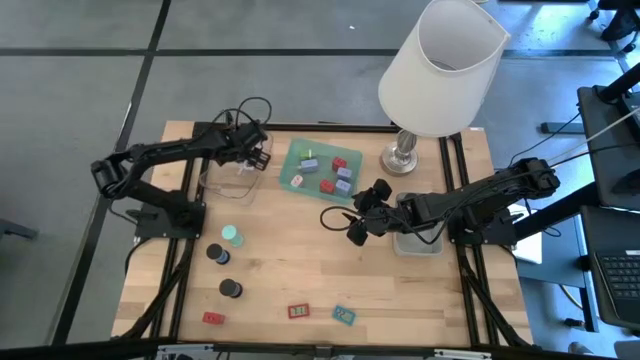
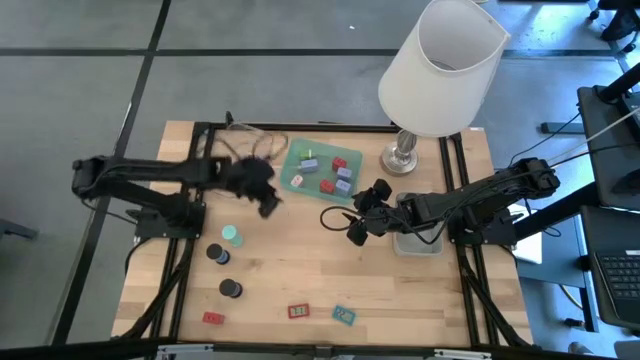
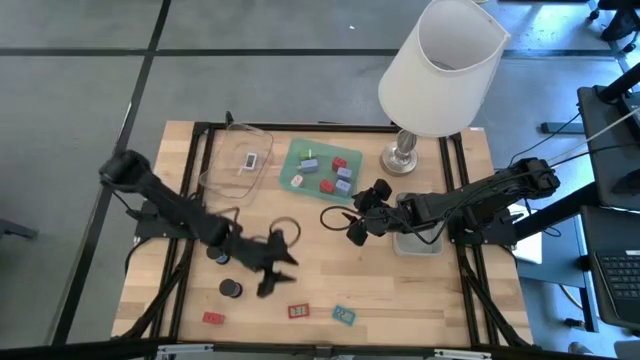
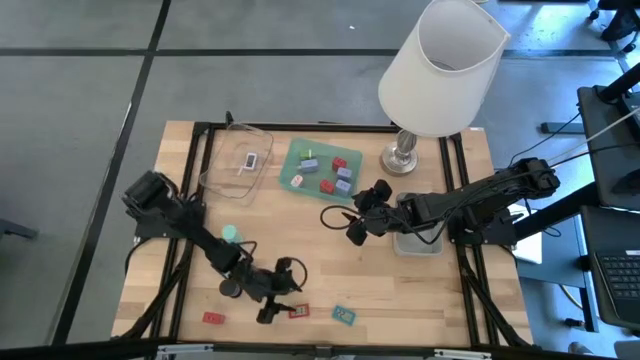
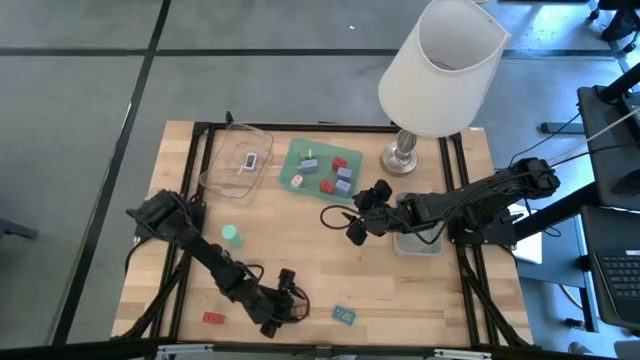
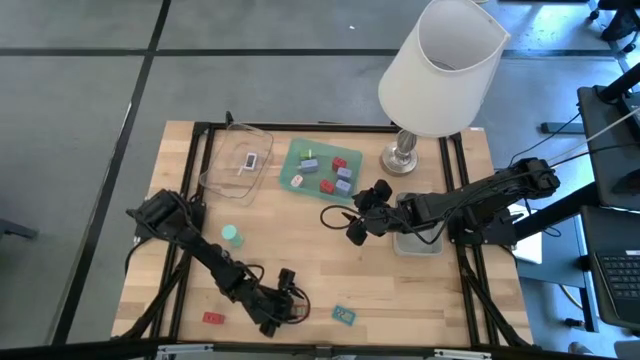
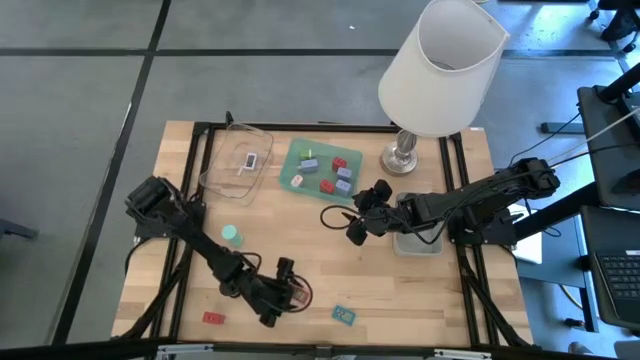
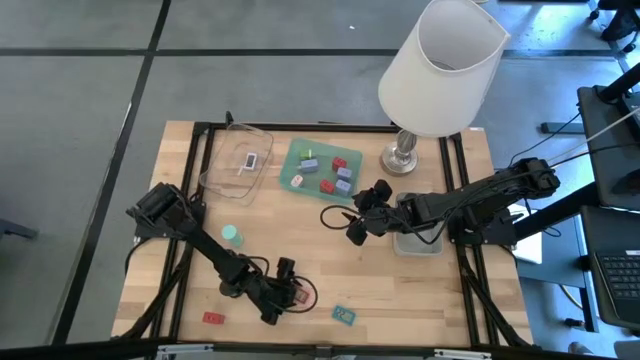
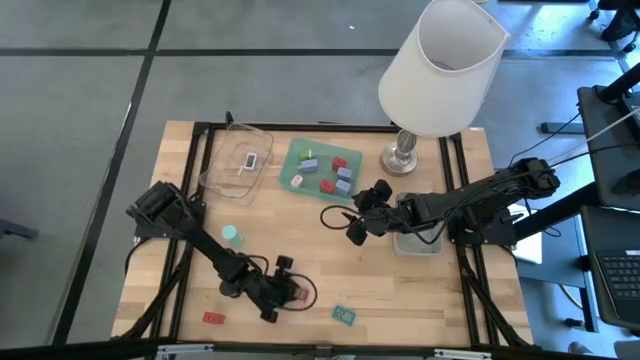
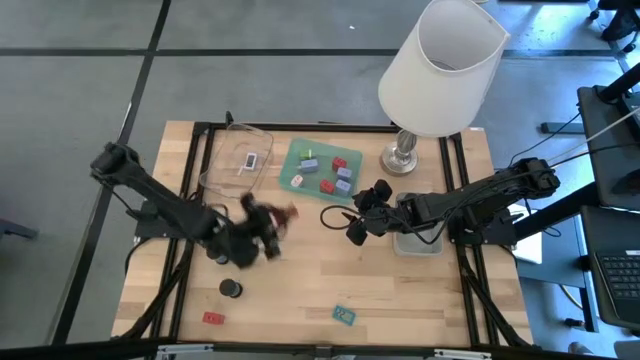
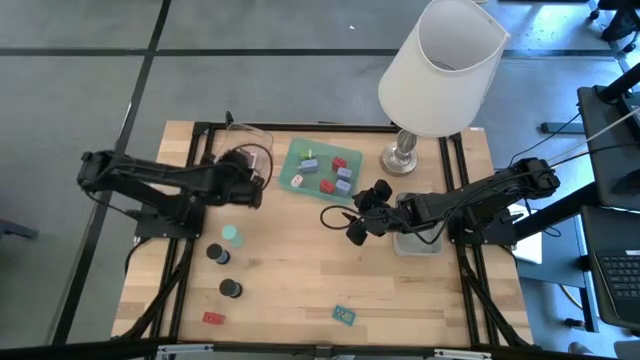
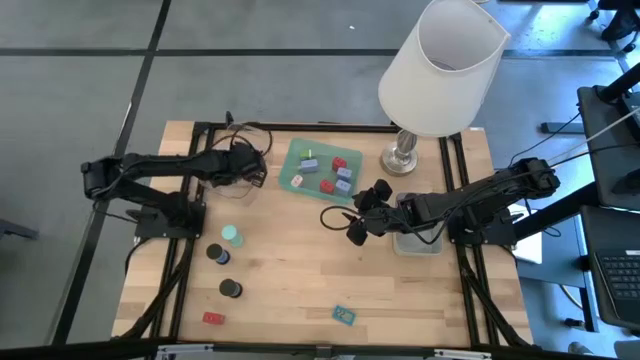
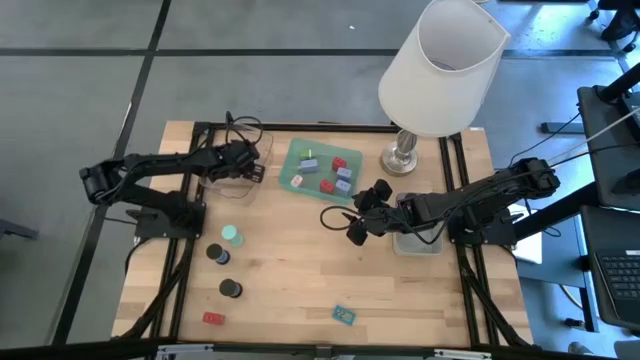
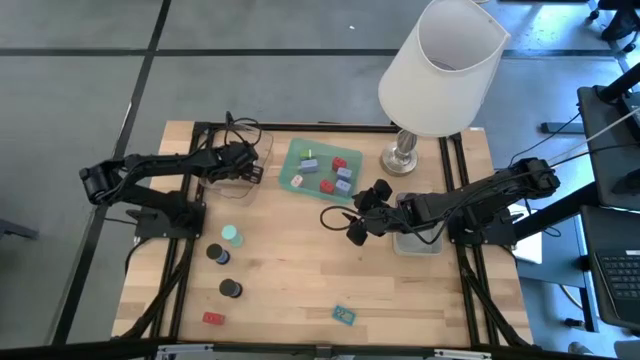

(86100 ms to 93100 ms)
Task: Pick & Place Office items
Put the red timer into the transparent bin

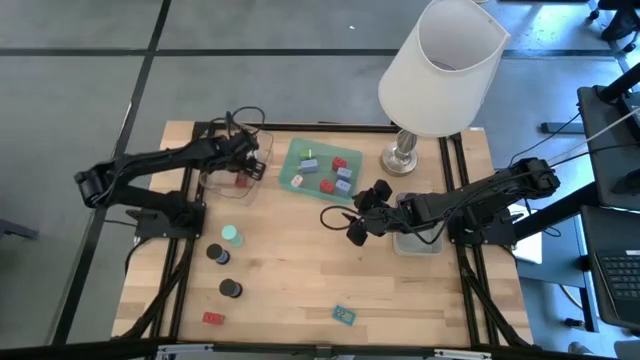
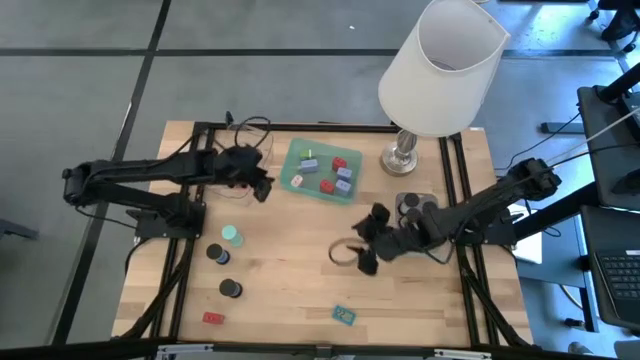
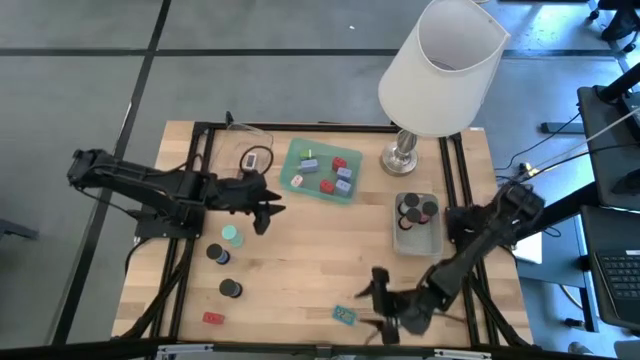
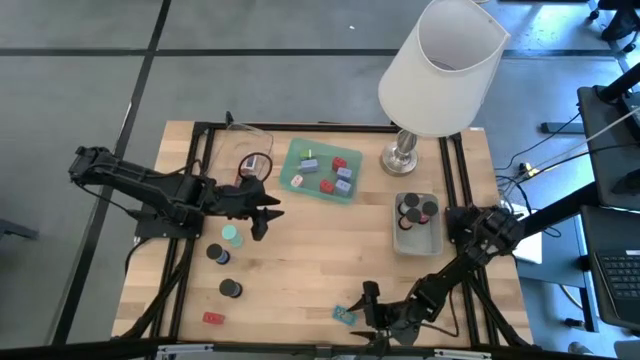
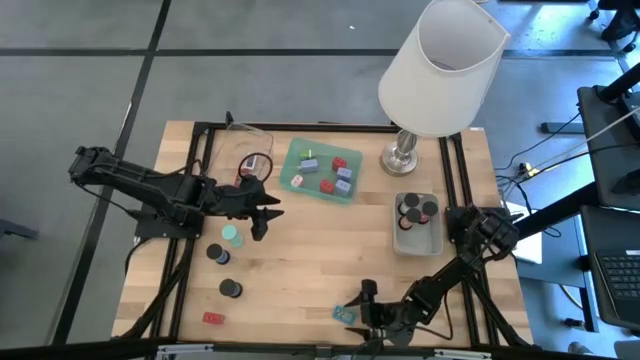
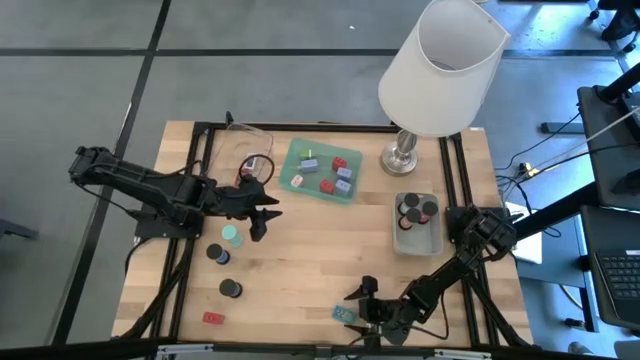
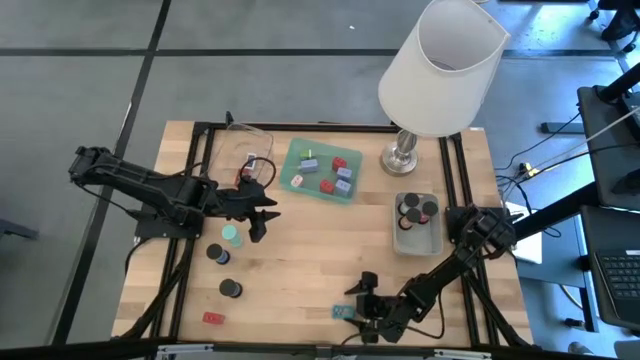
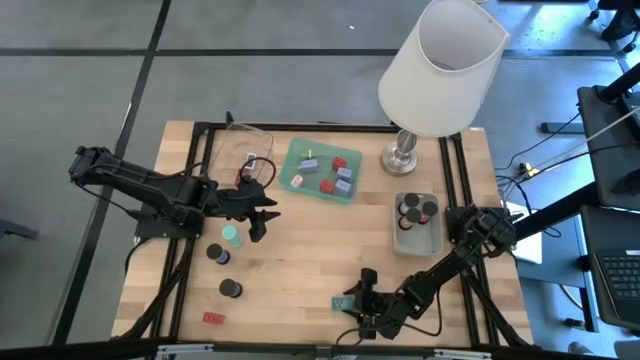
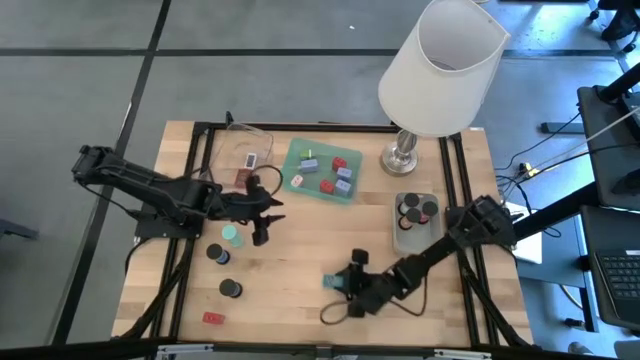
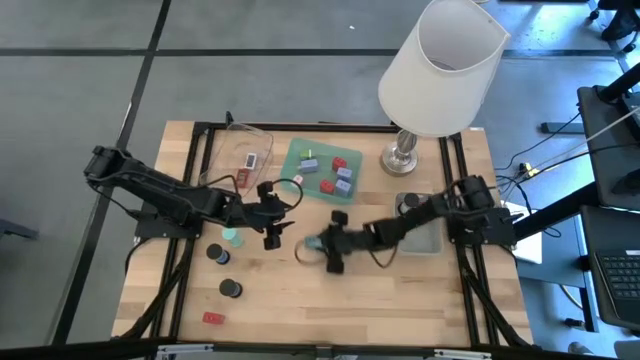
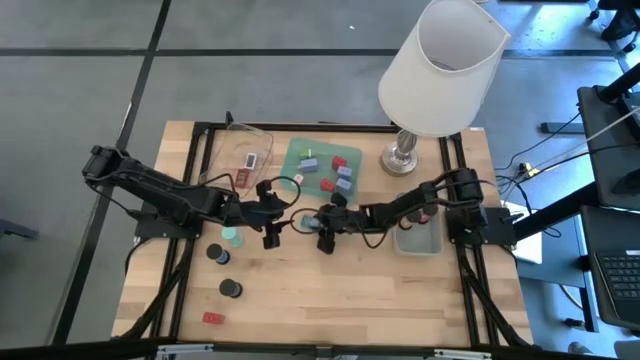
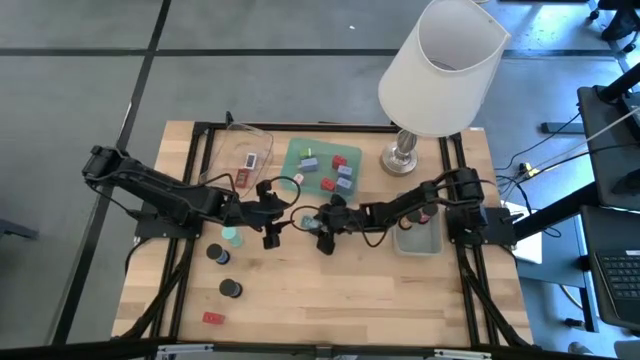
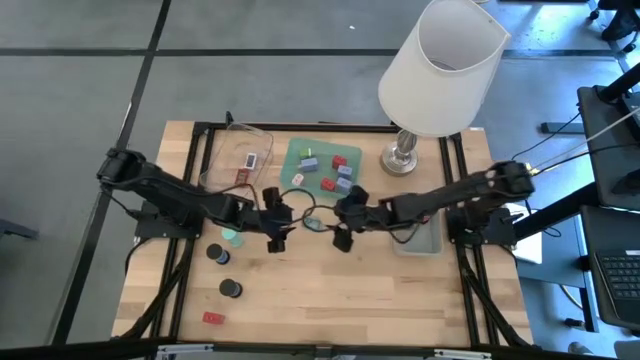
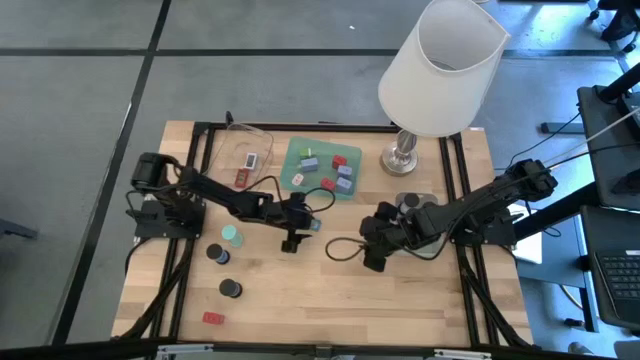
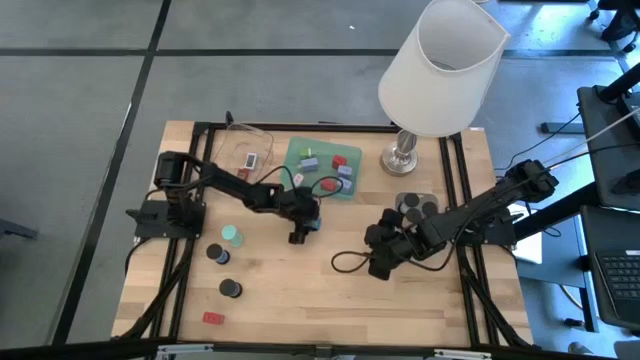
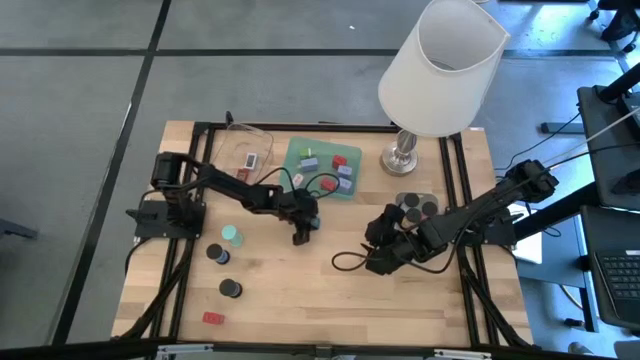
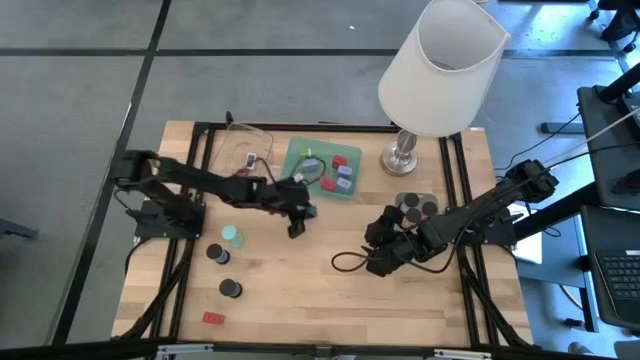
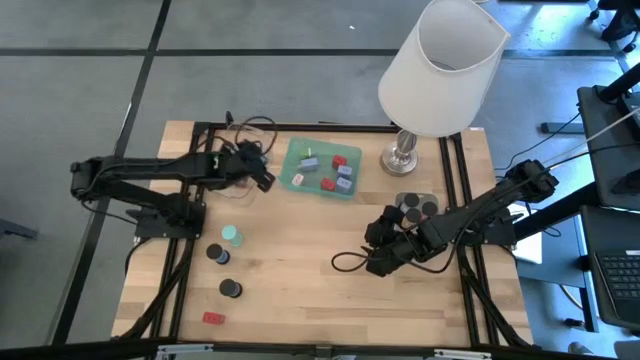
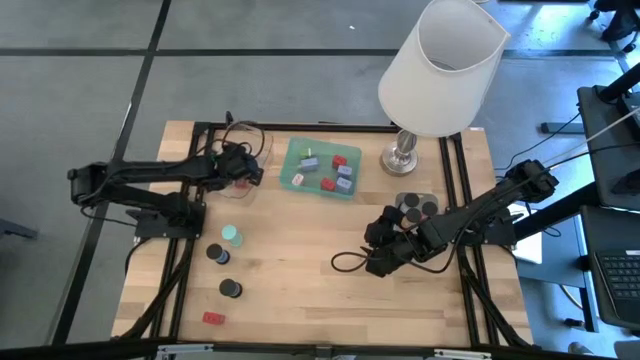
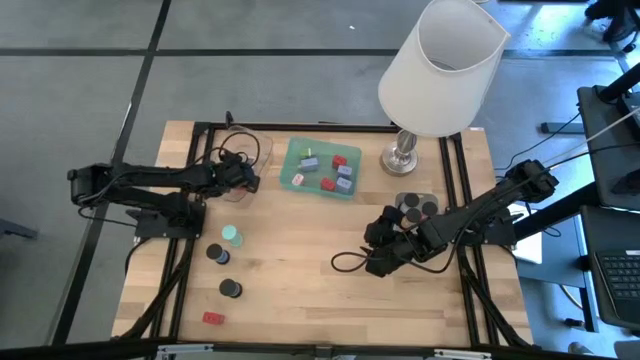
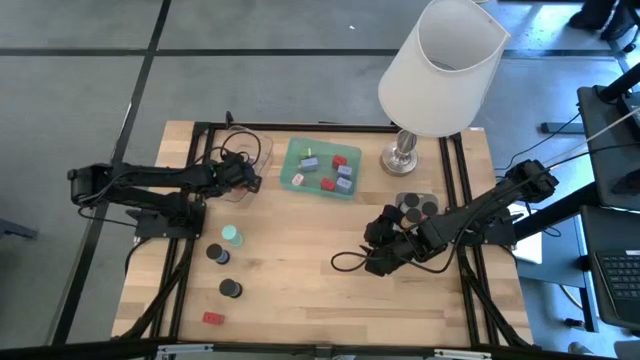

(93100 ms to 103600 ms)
Put the blue timer into the transparent bin
